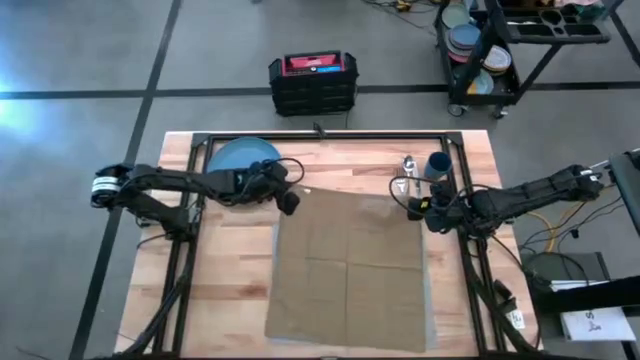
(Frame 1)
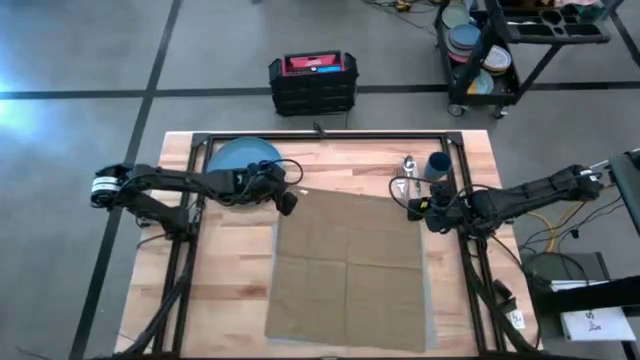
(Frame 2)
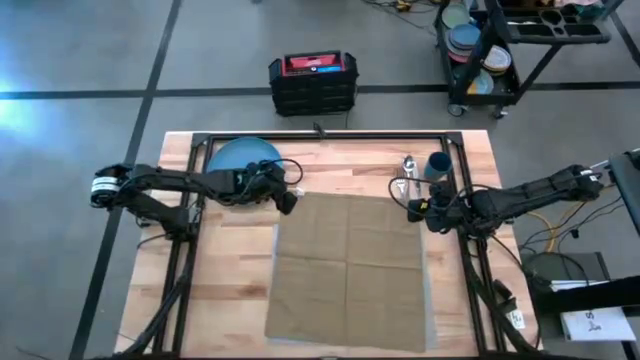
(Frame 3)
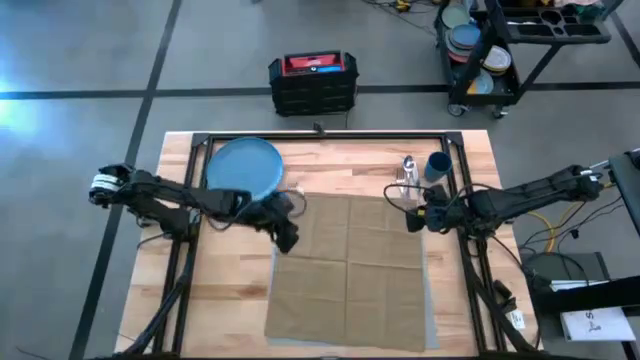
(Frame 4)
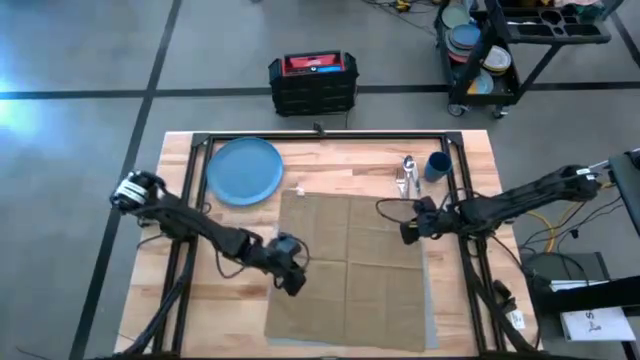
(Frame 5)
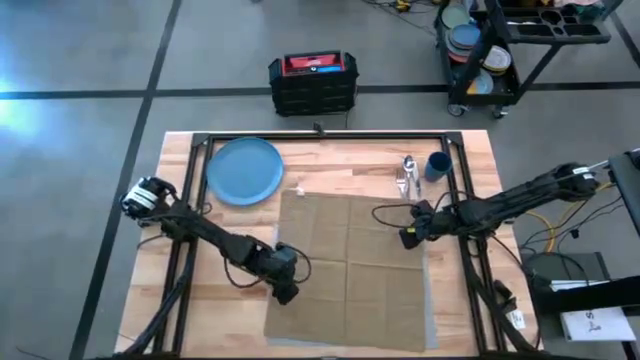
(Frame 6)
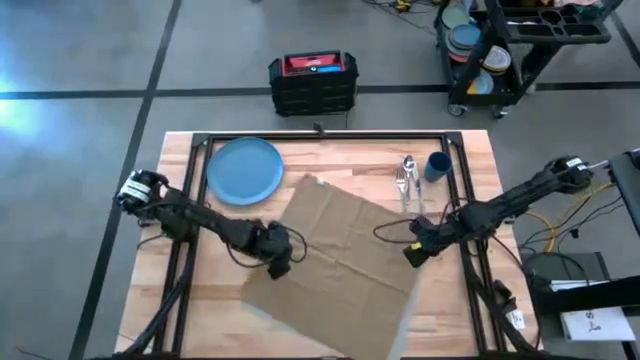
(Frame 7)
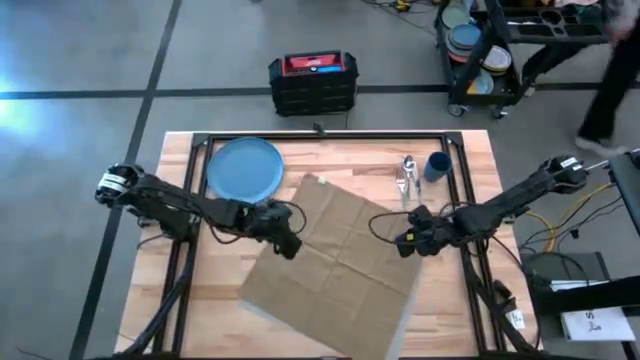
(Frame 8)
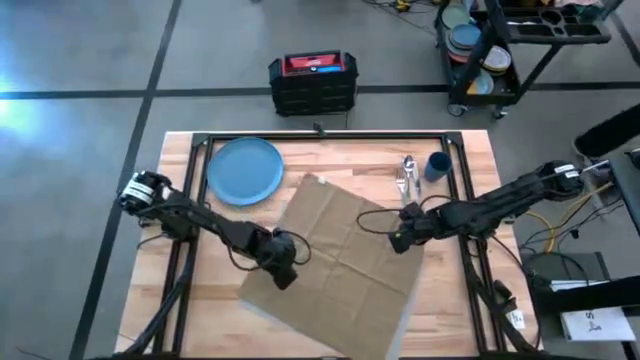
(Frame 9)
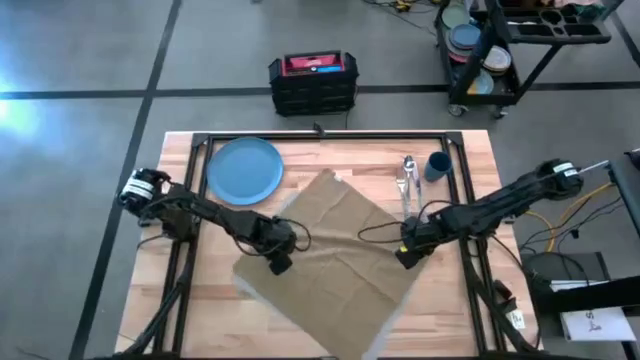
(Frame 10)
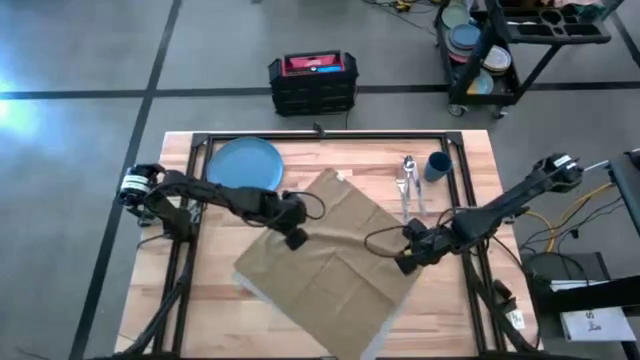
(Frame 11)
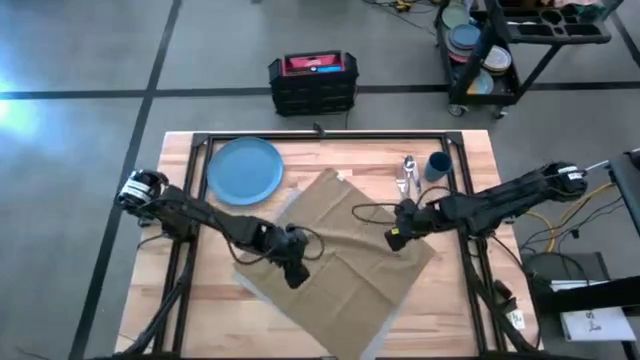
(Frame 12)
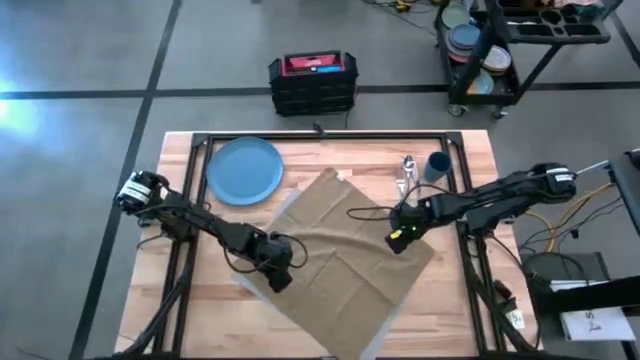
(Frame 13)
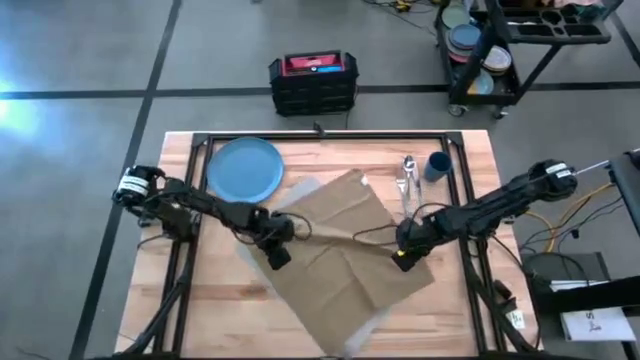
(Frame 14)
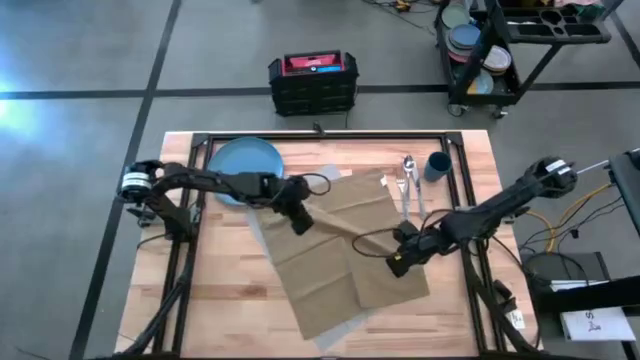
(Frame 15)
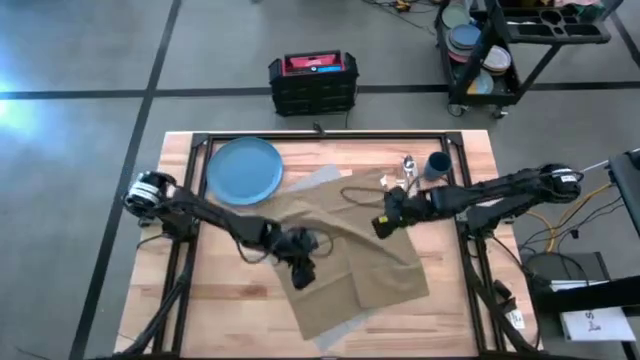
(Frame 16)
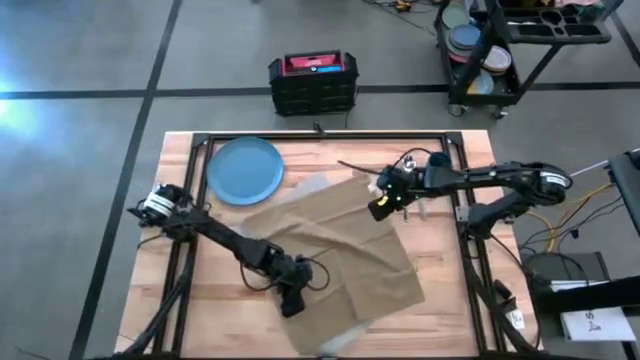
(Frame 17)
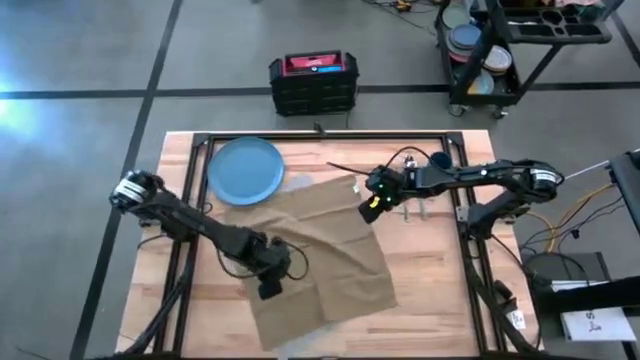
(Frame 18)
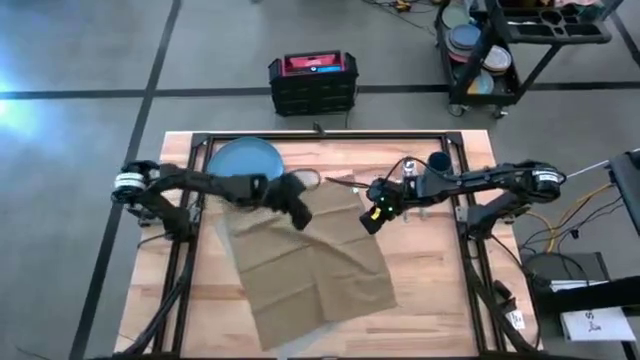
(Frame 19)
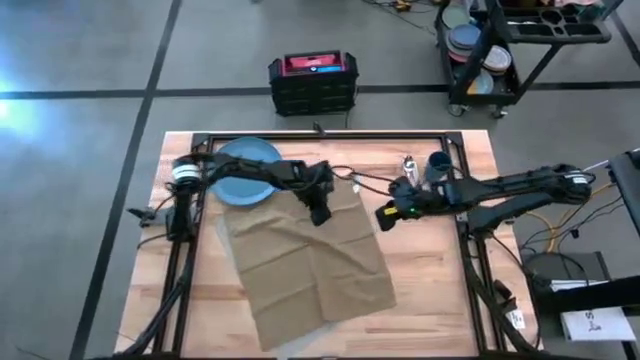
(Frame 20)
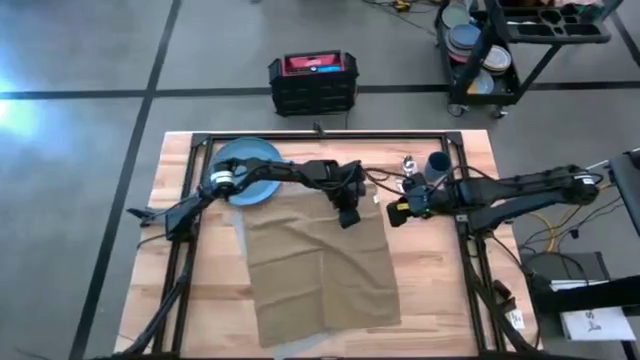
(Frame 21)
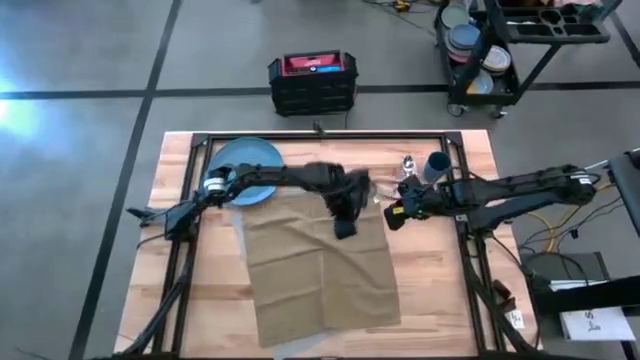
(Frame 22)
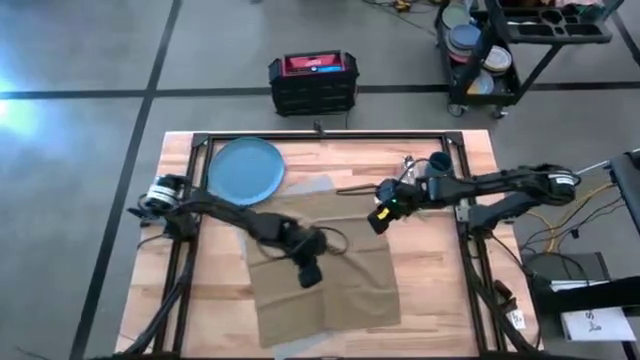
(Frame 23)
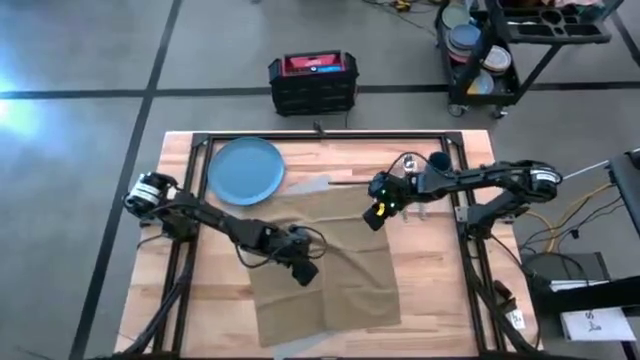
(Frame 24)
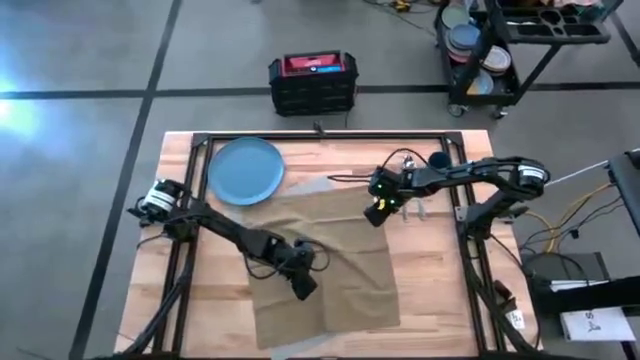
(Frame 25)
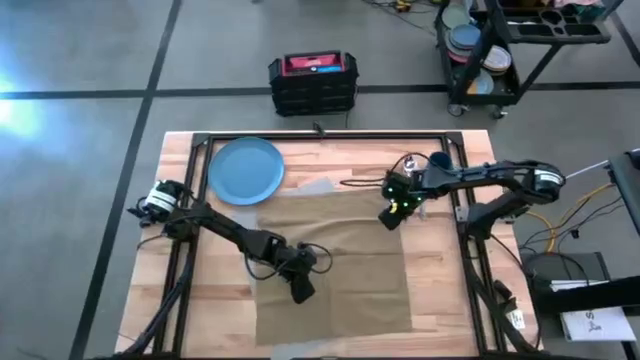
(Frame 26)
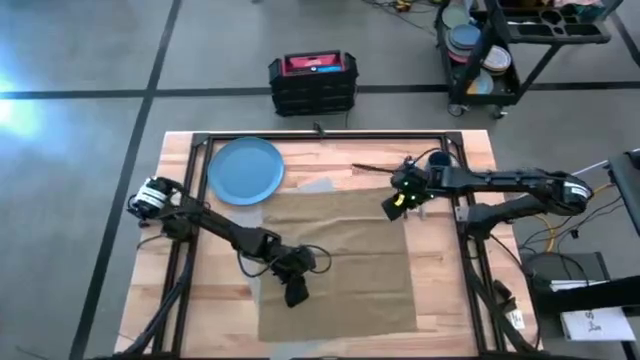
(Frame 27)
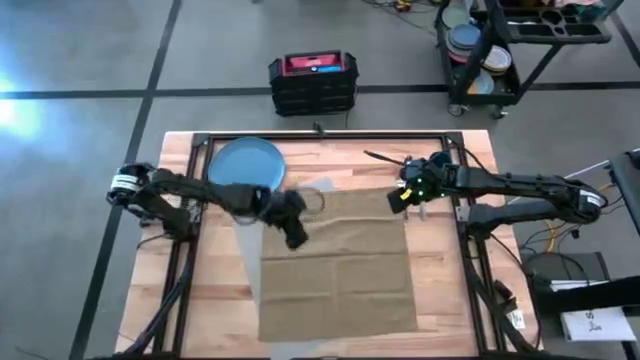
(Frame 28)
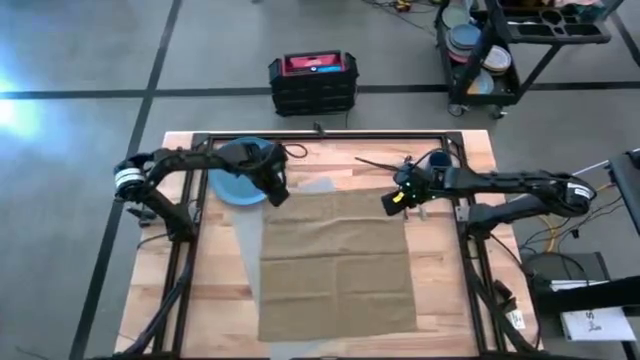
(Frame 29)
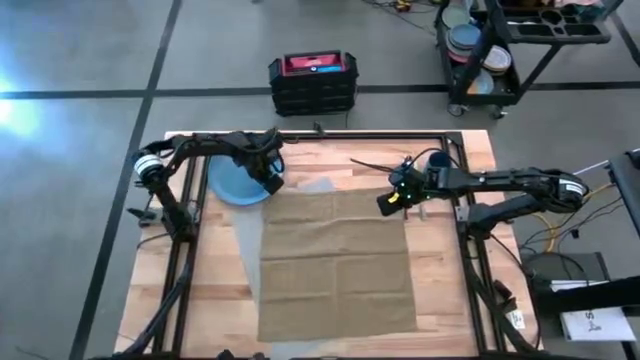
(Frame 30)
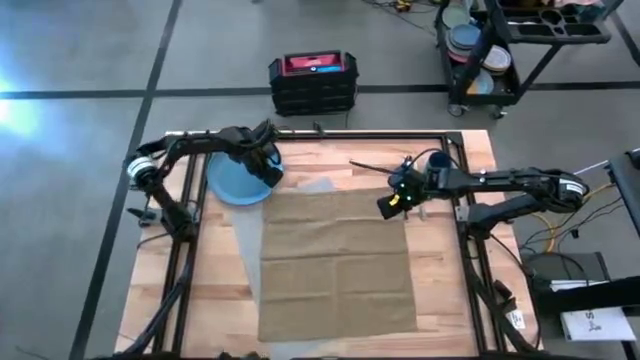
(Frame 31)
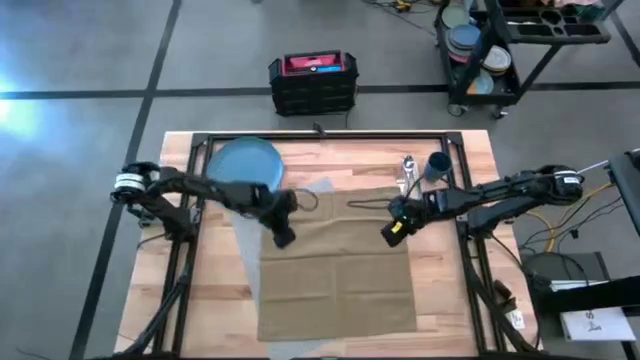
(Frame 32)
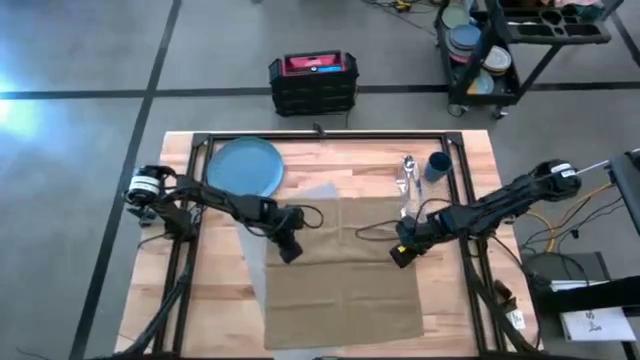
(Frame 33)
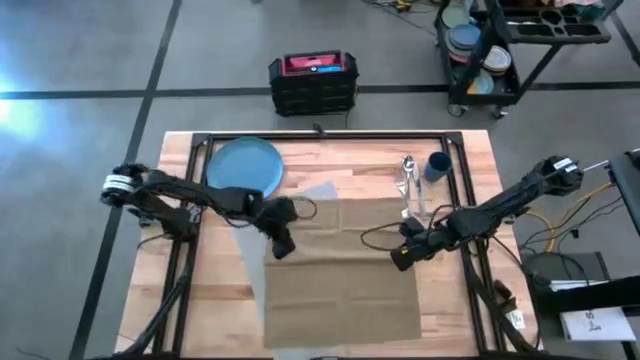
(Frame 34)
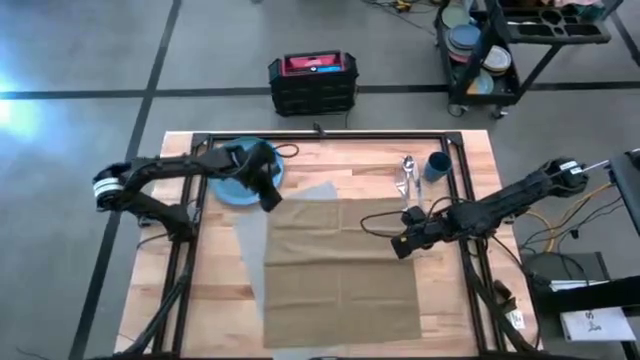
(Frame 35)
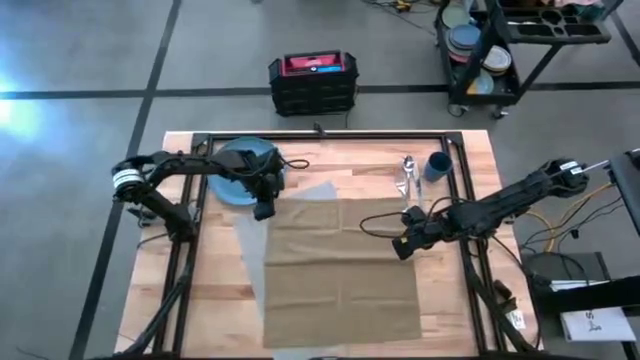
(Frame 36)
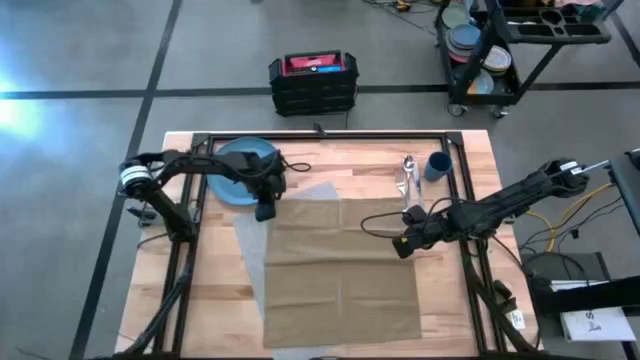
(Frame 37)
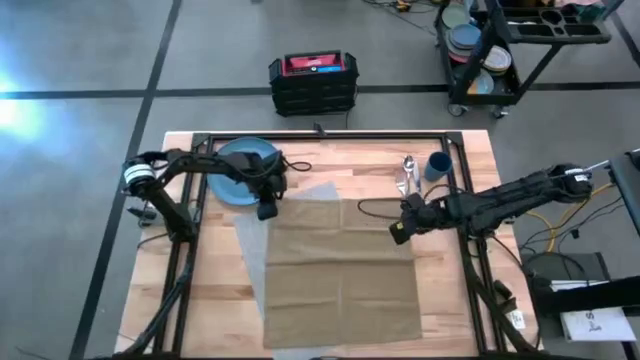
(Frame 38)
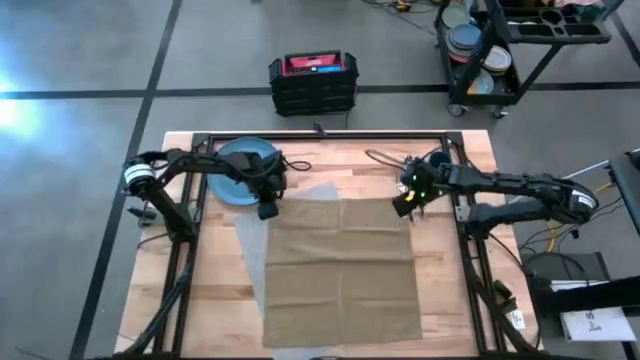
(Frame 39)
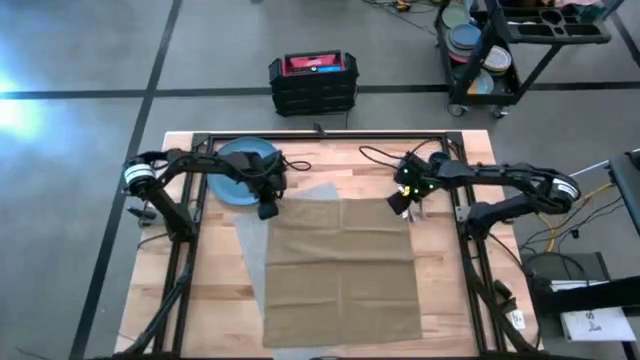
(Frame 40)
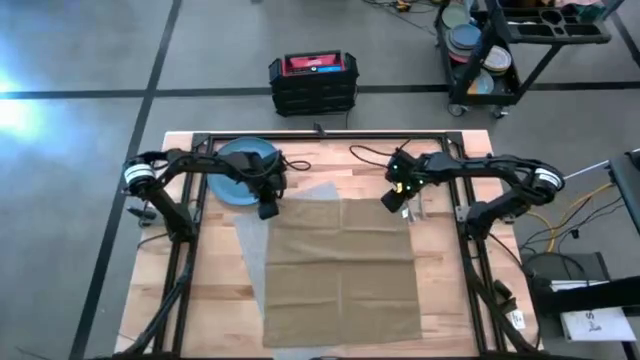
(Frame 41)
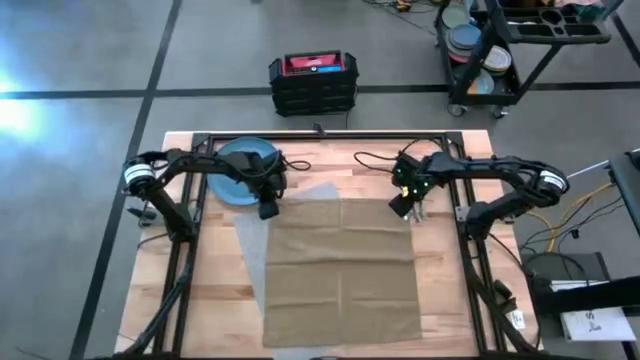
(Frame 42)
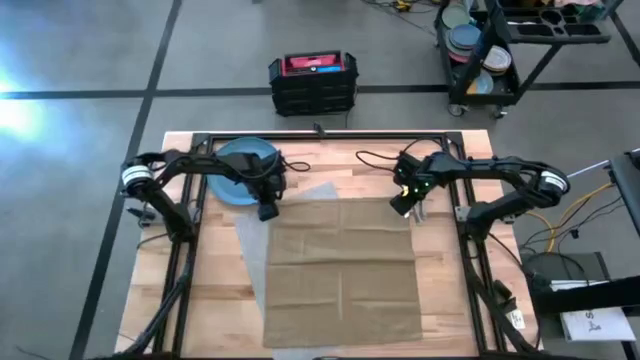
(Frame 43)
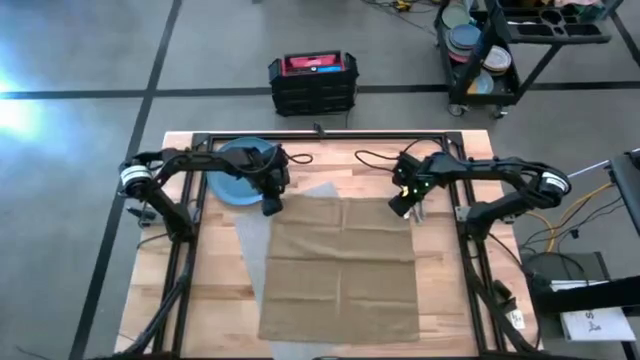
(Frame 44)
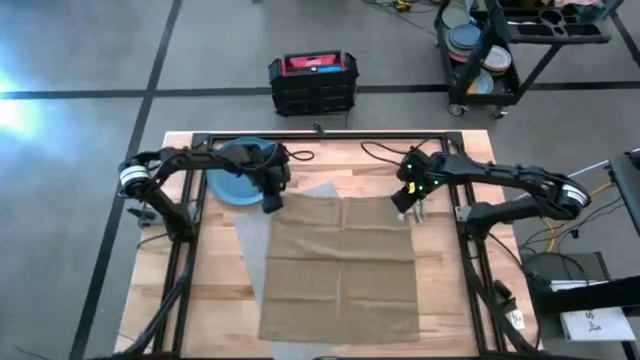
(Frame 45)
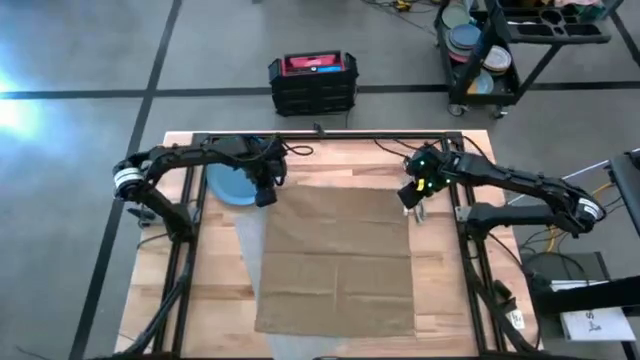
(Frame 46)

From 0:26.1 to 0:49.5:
Task: Set table place
Fold the brown table napkin
